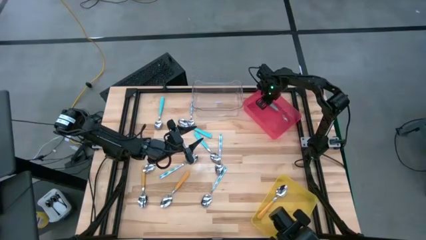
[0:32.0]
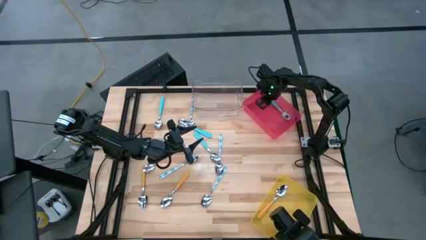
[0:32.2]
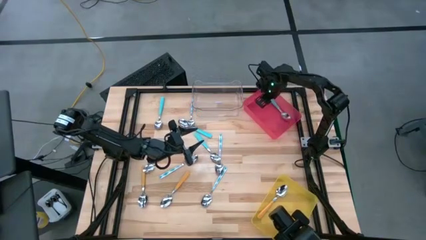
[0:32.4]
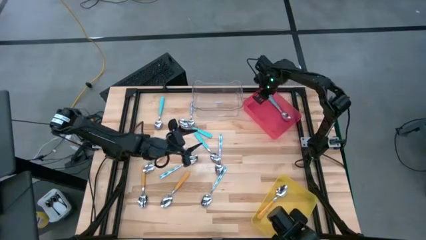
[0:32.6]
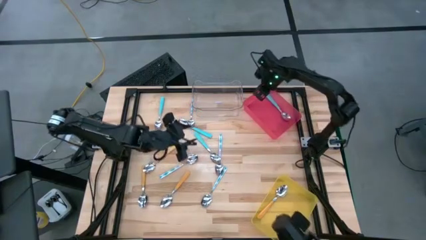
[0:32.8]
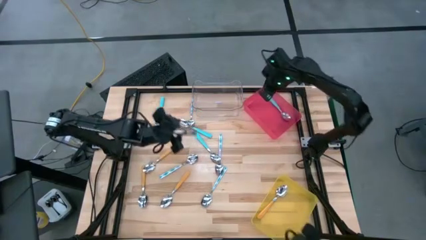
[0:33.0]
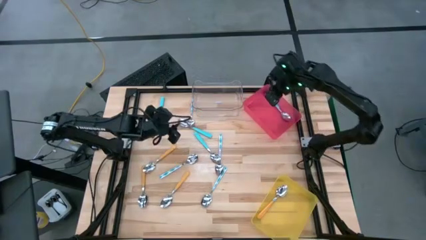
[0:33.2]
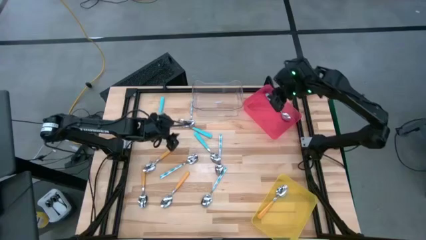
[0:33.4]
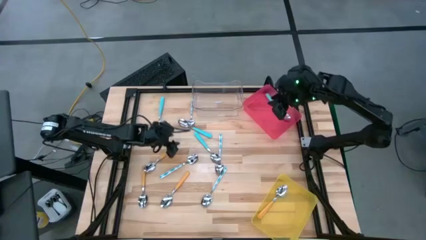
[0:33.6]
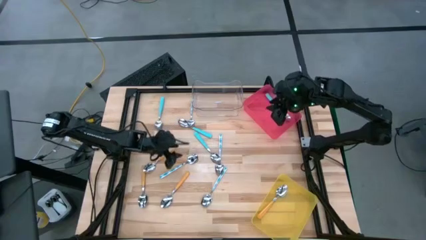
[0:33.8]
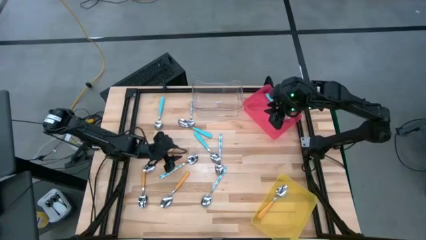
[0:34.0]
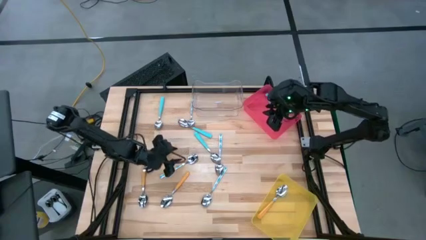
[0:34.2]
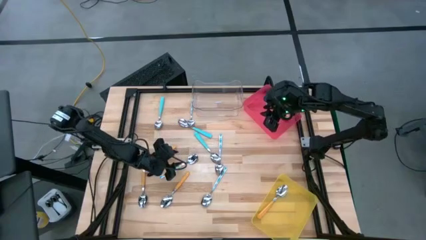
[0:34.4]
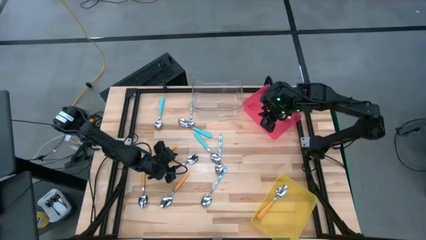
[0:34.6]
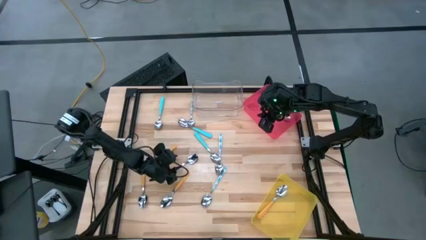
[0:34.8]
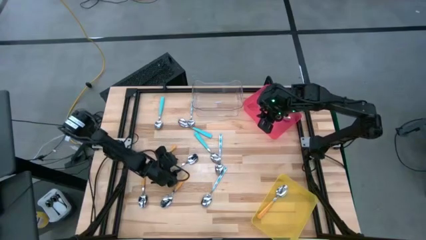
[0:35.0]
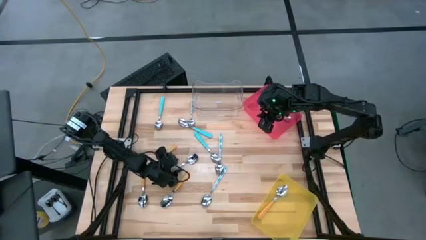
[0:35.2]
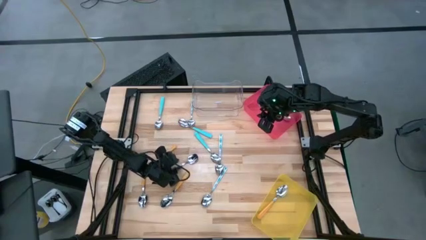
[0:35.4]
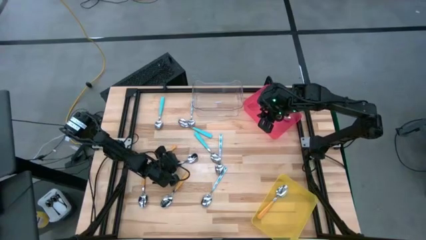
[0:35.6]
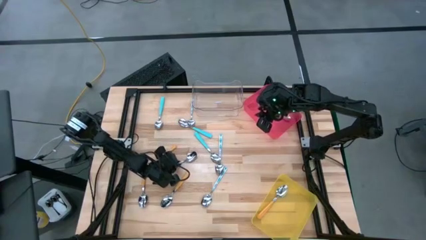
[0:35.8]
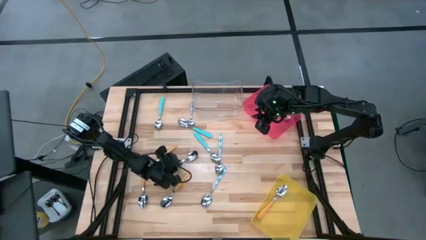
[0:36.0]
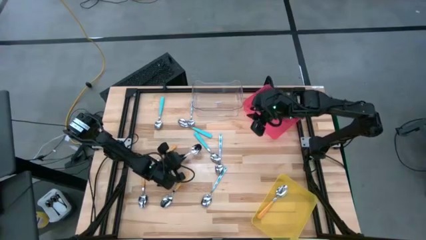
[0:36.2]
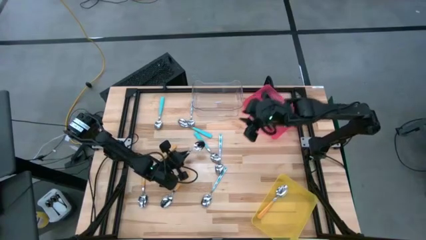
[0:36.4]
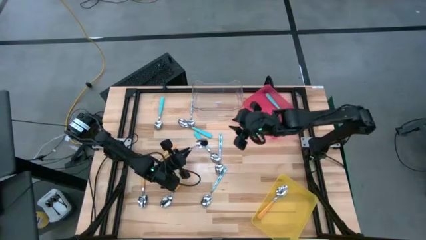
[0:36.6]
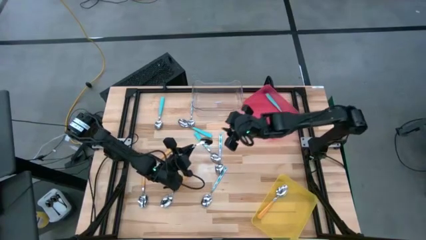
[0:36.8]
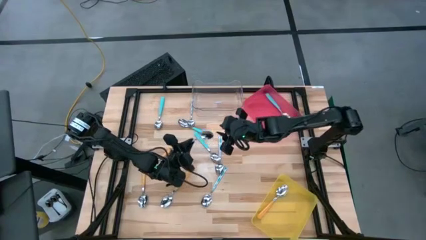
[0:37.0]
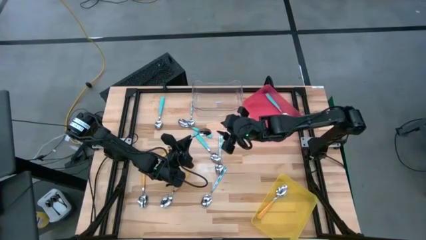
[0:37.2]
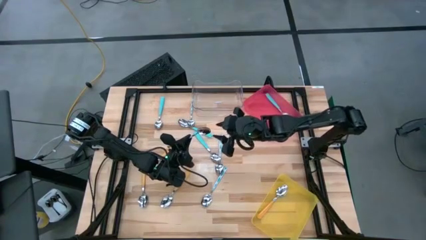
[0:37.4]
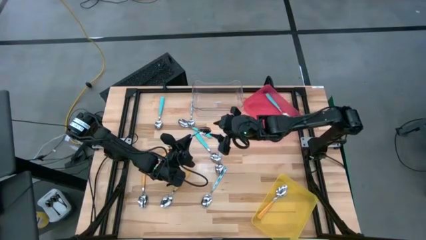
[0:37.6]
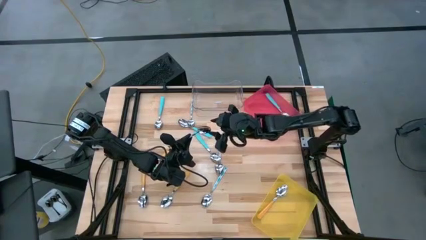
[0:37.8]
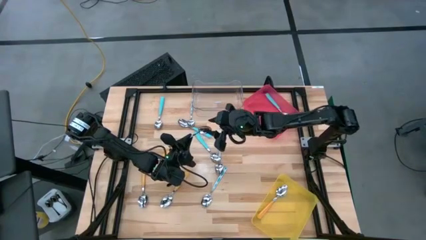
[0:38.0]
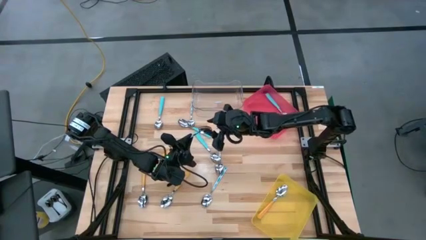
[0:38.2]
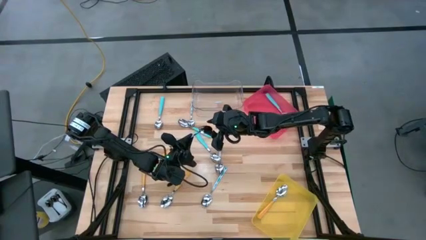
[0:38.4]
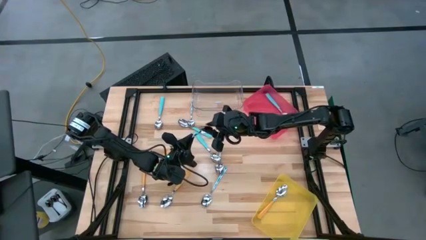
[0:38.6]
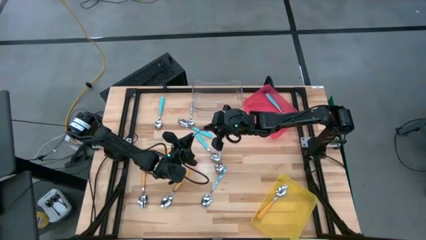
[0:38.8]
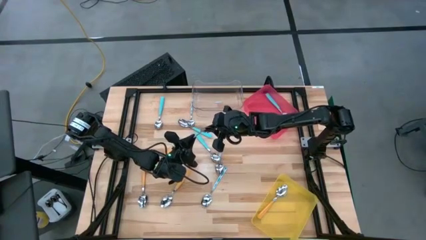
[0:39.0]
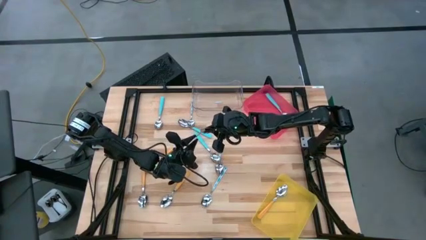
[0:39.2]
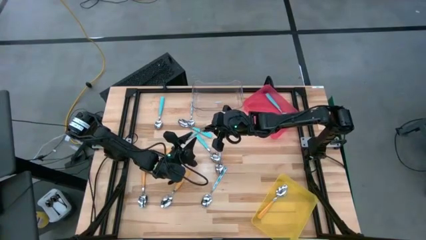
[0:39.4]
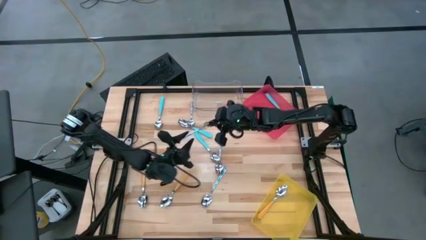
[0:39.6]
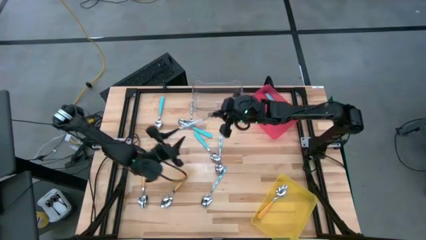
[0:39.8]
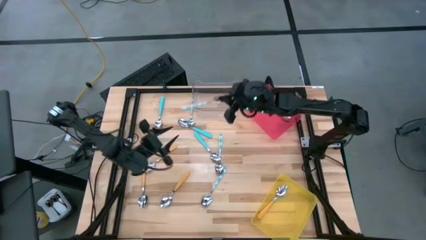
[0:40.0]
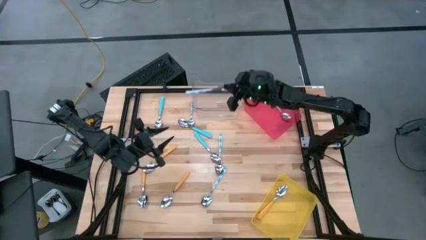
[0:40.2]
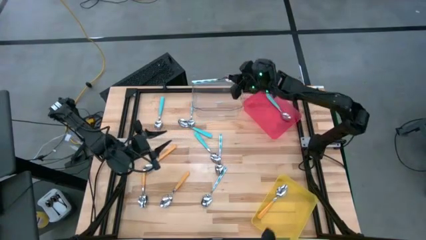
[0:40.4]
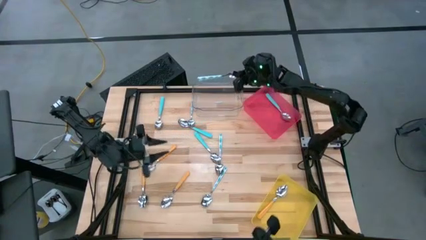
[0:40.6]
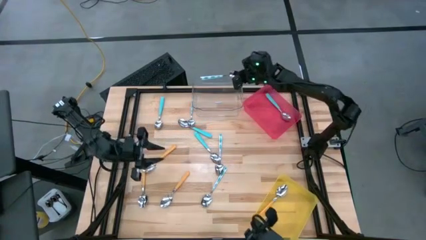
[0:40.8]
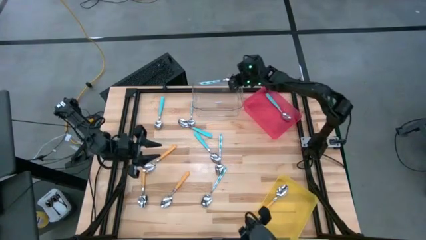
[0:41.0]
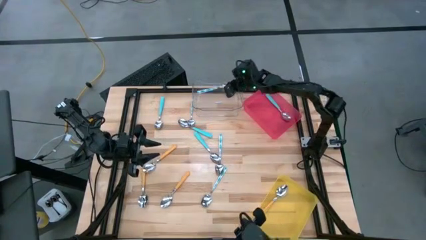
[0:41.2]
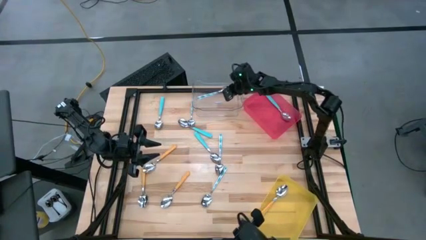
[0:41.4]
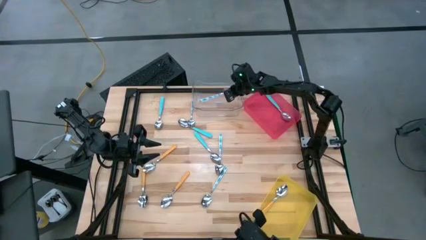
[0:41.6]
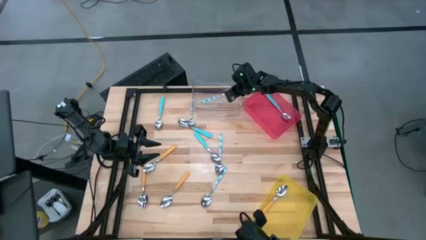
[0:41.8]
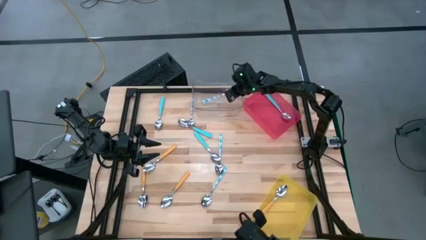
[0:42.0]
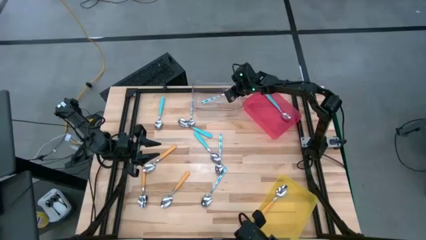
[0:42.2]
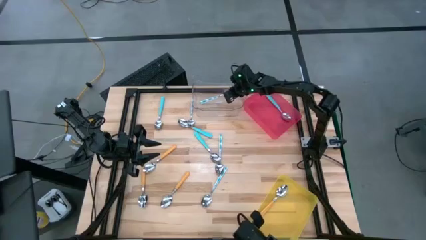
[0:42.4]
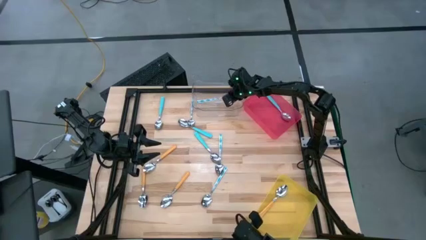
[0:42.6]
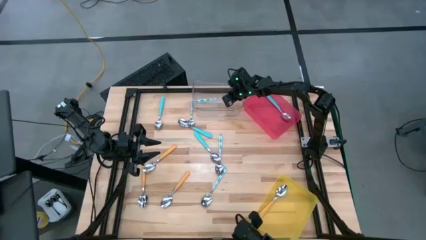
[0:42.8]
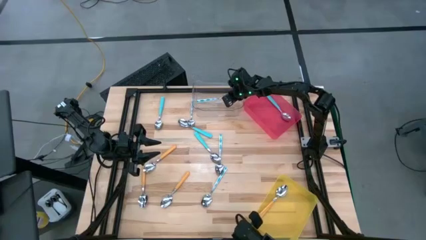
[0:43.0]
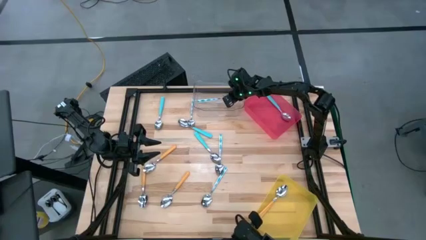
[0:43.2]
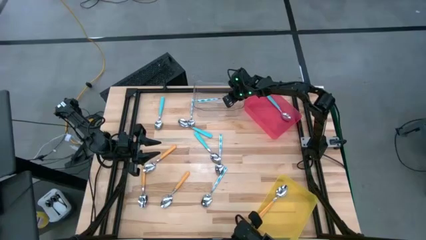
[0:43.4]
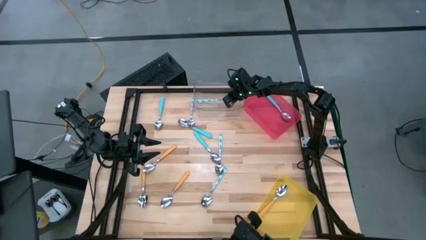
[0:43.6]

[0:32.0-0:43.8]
Task: Sort silverware by color (type)
Put the white-blue spoon into the transparent bin

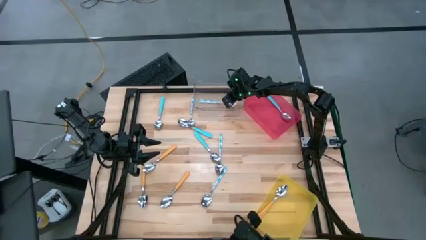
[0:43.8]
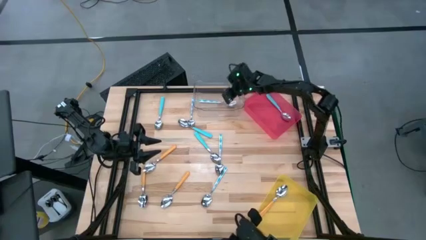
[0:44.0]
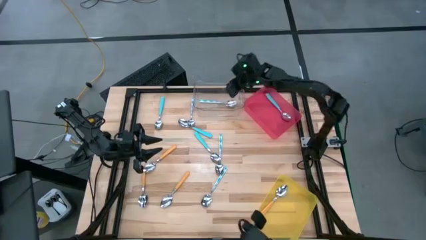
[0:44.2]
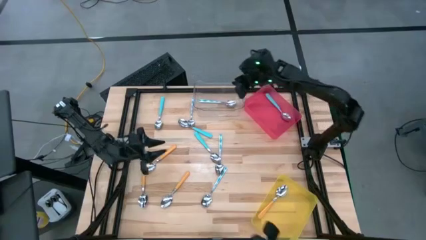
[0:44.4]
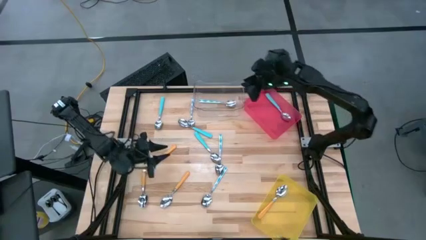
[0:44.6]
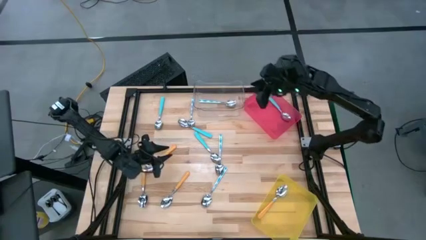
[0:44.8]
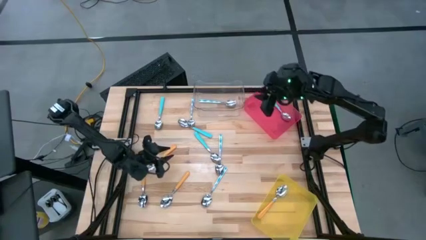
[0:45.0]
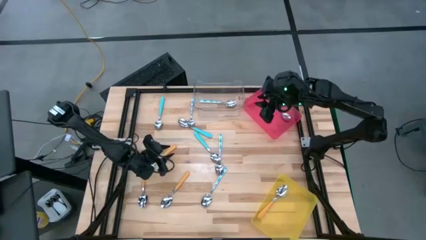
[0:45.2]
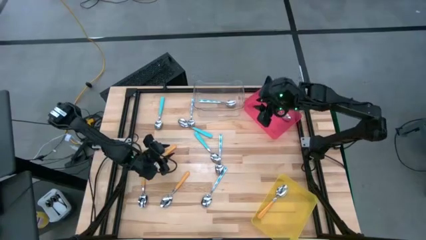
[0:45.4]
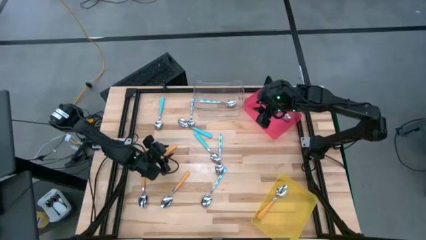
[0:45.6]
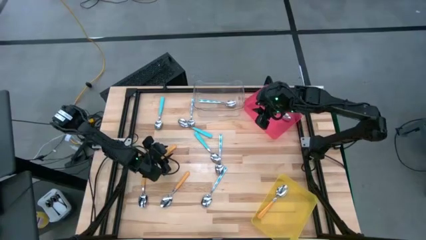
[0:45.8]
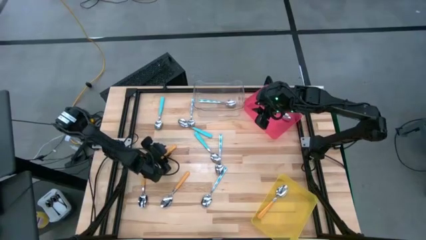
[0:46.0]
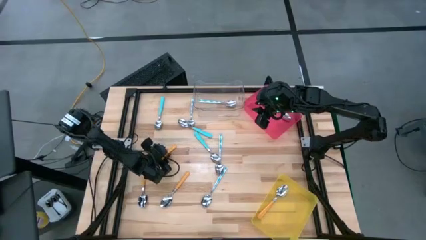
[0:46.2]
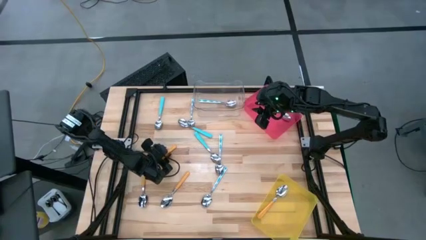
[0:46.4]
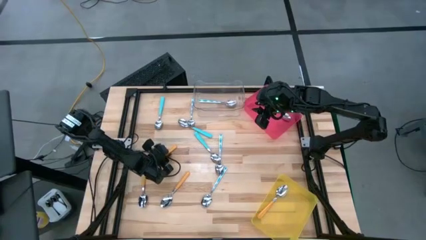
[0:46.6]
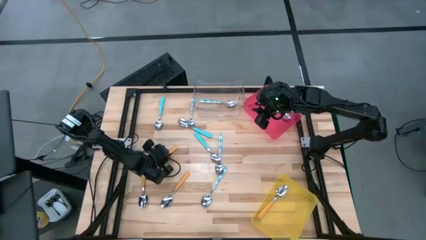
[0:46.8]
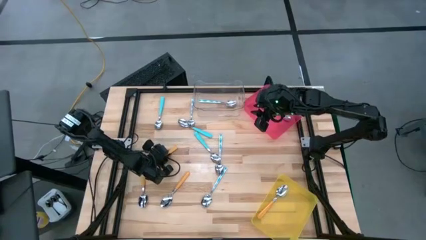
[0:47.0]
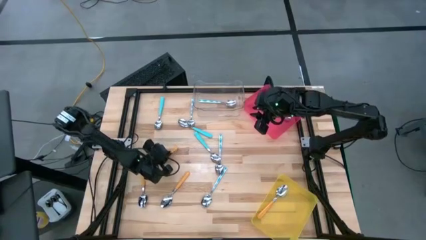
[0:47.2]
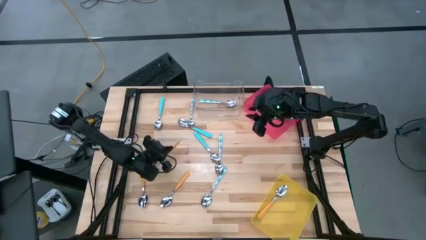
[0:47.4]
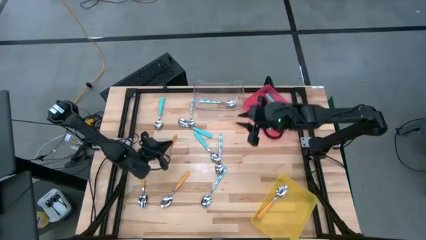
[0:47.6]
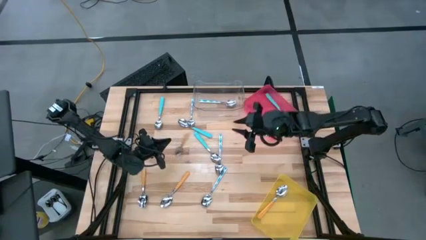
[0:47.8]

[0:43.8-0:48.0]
Put the orange spoon into the yellow bin
